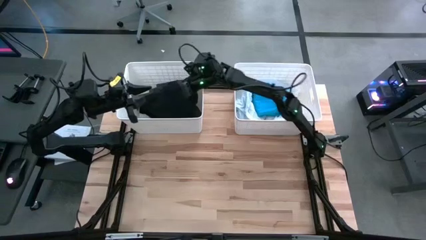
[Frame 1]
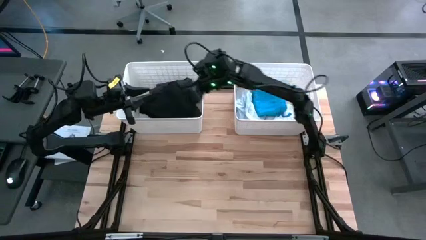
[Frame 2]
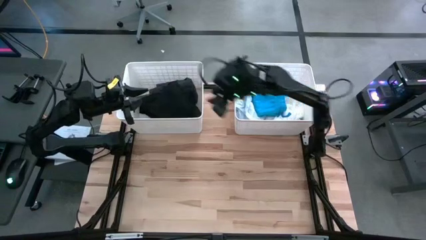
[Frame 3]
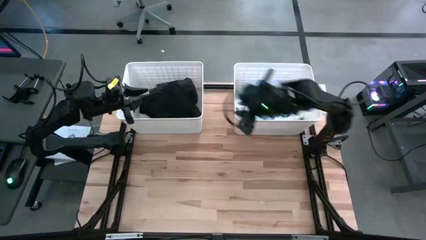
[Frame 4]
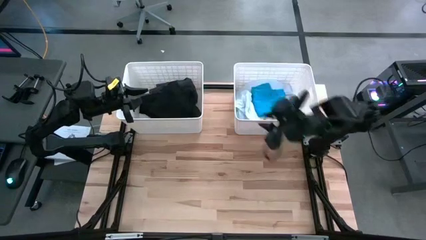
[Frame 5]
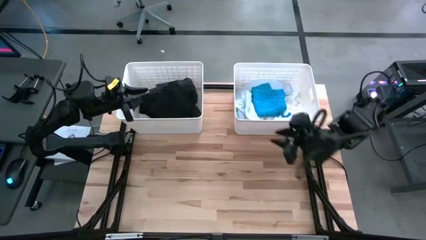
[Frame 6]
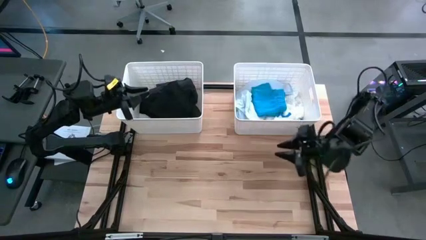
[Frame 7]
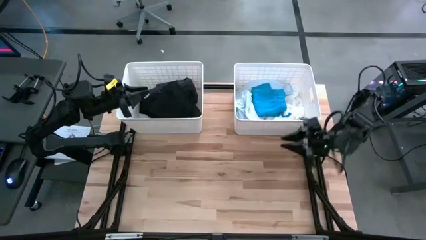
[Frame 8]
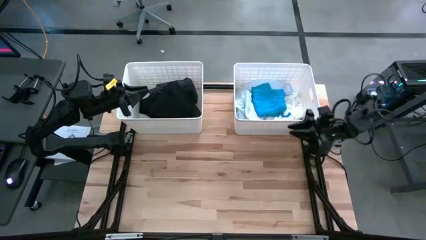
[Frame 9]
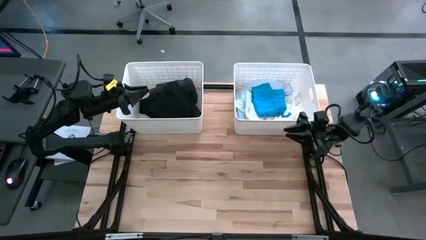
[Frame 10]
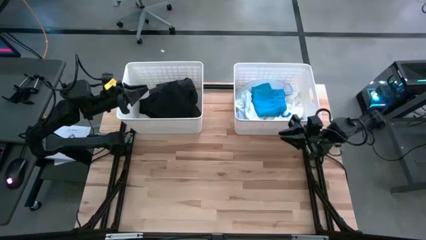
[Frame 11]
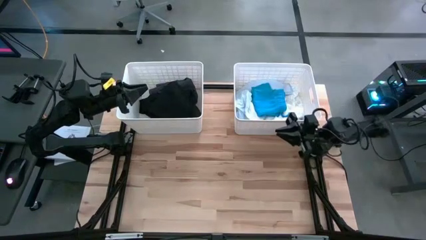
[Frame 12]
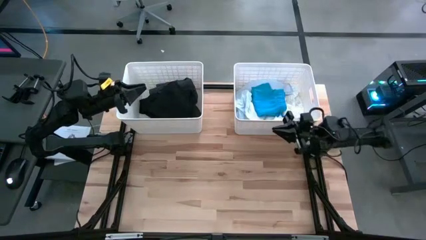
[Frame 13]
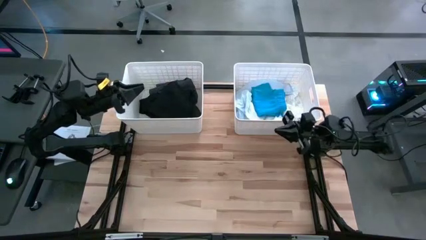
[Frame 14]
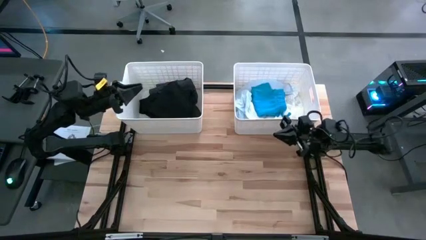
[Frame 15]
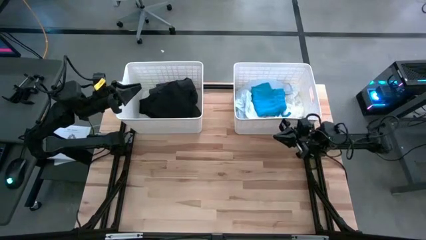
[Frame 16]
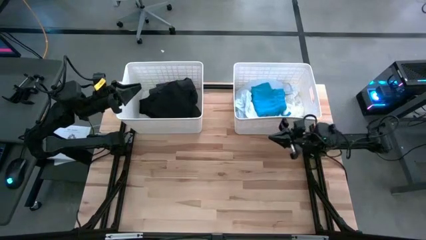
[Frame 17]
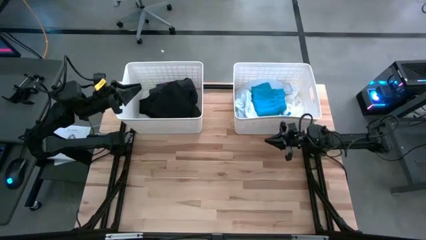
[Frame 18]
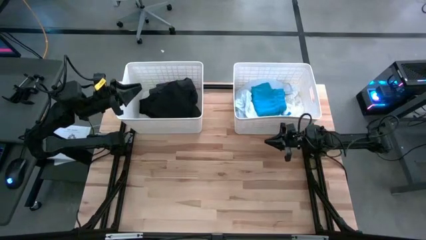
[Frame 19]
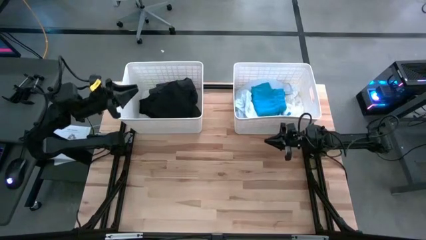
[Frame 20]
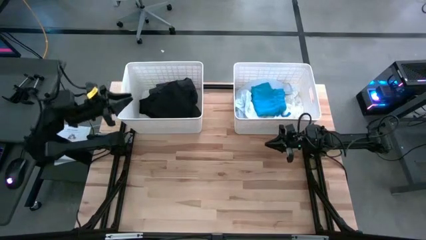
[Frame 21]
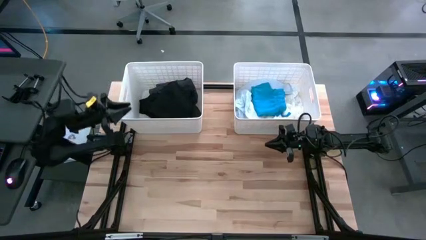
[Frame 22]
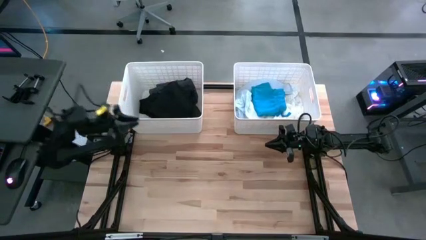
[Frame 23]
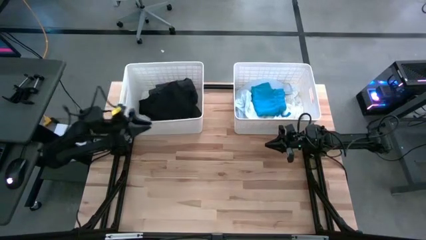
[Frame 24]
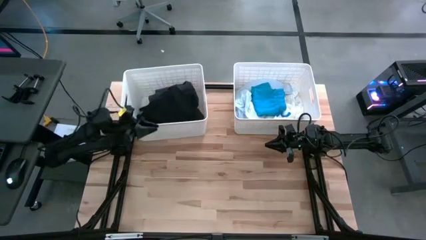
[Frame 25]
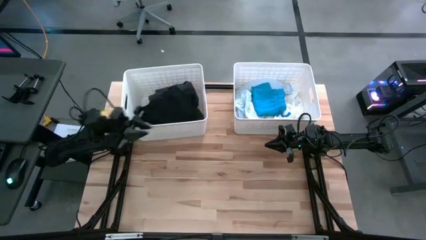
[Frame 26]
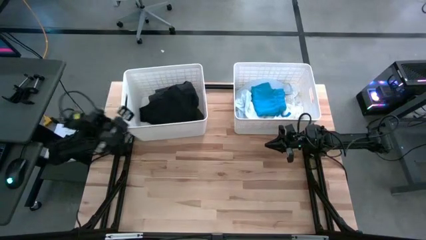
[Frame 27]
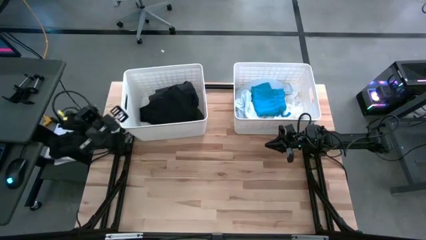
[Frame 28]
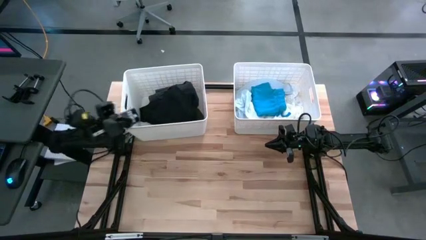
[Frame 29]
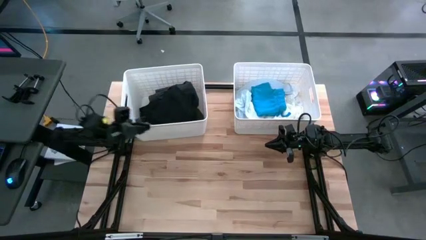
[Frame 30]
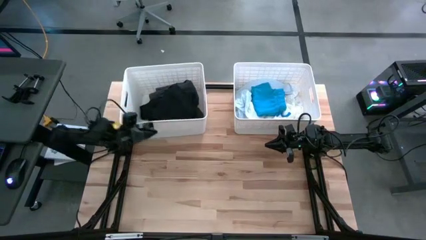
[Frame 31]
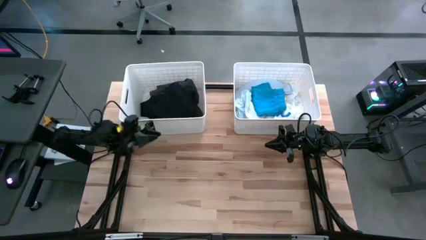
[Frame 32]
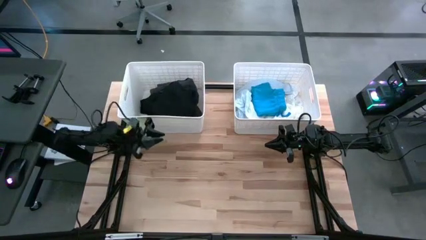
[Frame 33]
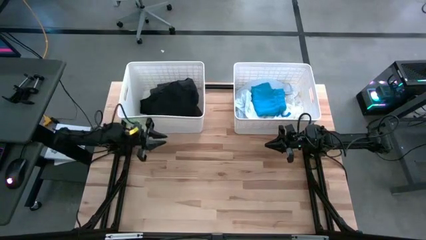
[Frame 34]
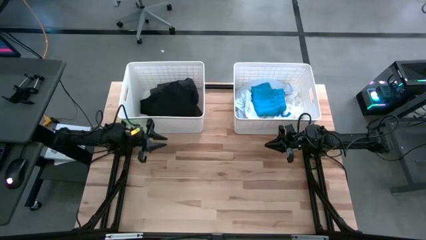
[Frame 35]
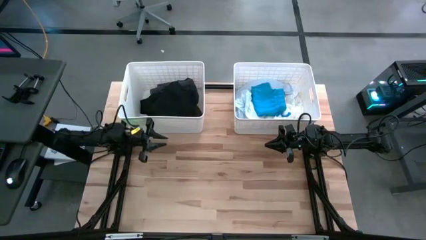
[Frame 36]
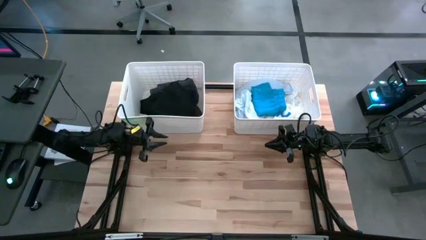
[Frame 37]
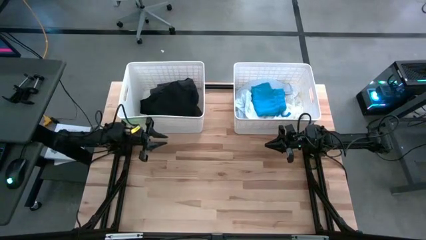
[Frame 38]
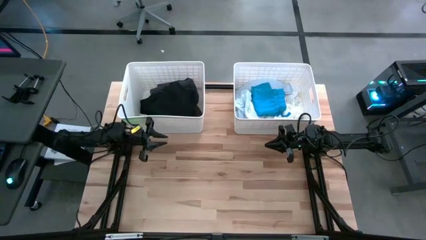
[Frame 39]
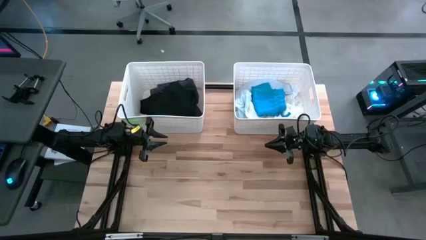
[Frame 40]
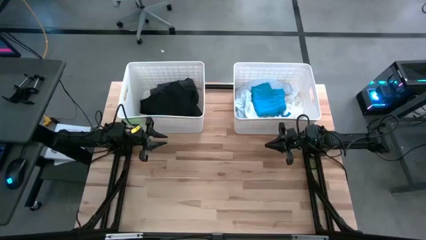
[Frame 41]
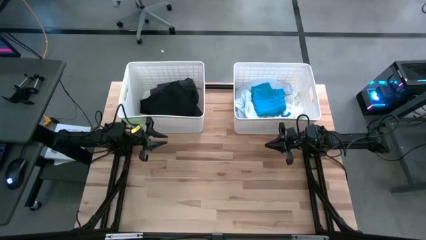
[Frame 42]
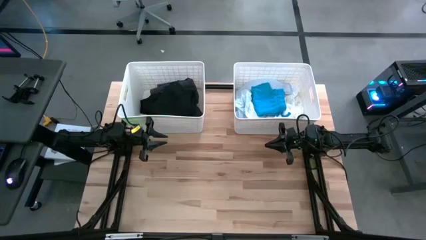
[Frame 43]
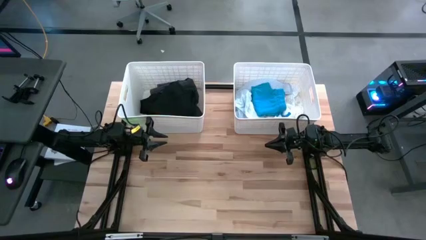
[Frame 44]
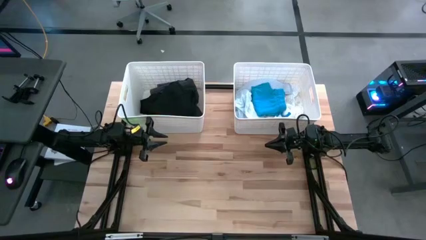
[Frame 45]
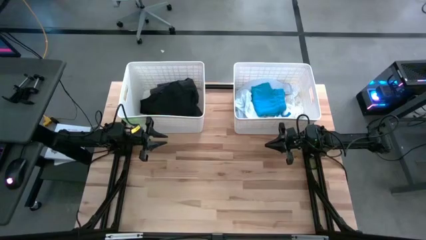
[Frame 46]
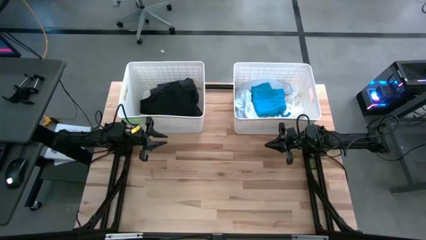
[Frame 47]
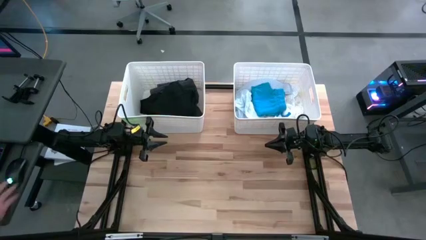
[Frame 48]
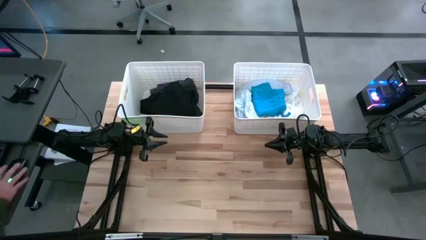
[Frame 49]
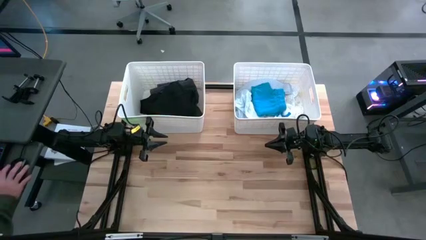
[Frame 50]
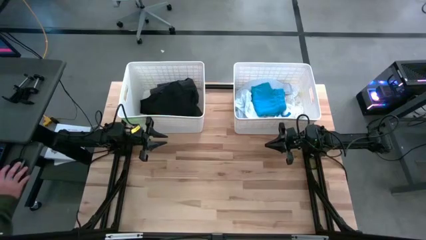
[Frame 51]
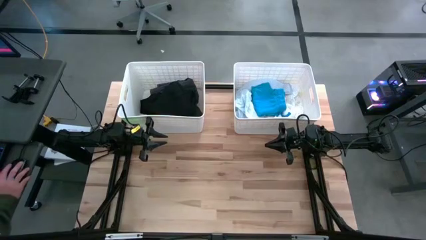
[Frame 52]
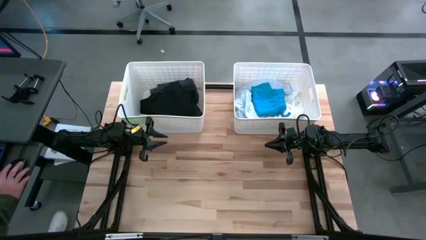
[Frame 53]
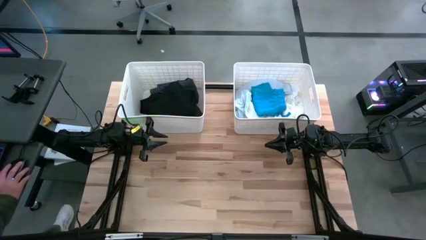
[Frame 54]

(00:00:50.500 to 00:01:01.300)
Task: Sort clothes
Return to Home Position

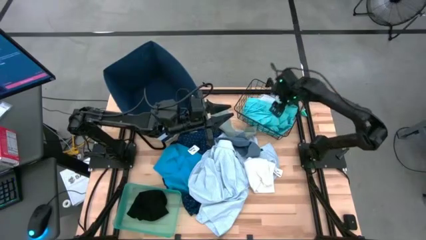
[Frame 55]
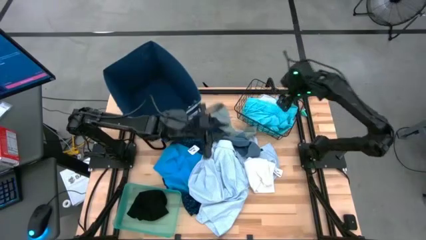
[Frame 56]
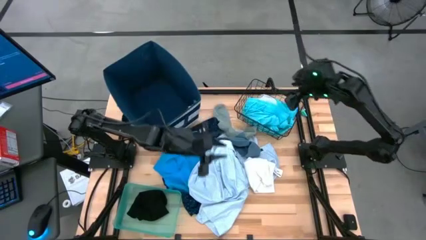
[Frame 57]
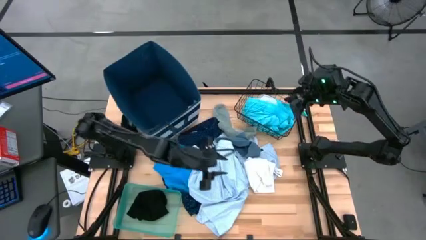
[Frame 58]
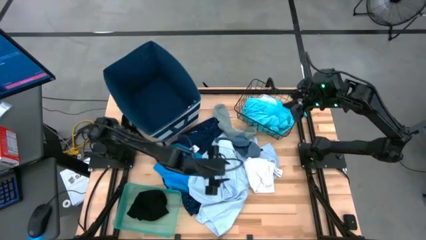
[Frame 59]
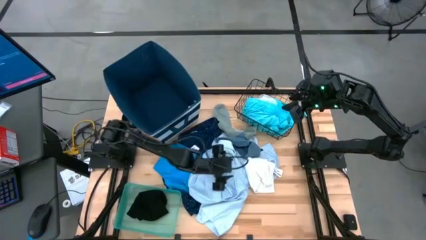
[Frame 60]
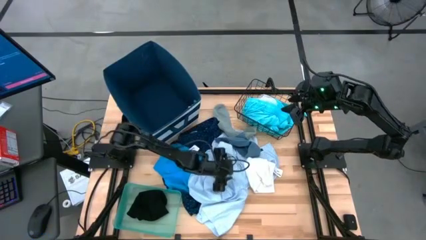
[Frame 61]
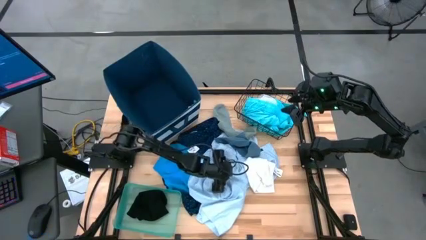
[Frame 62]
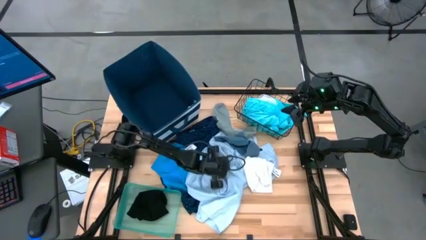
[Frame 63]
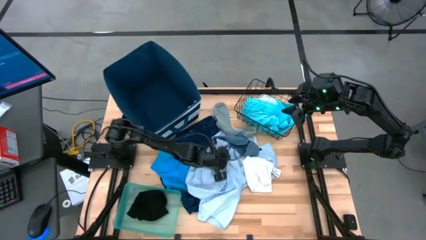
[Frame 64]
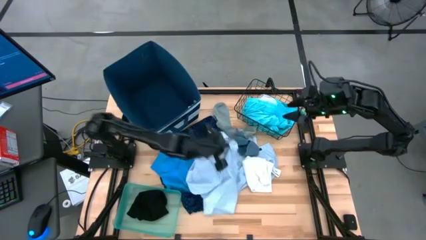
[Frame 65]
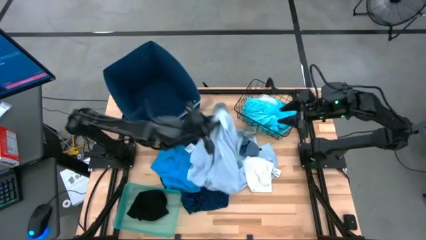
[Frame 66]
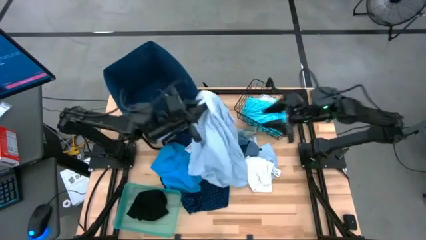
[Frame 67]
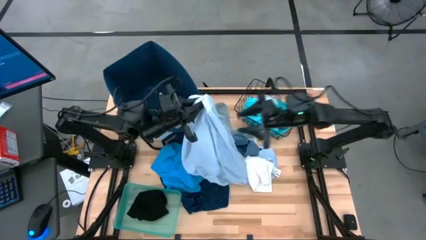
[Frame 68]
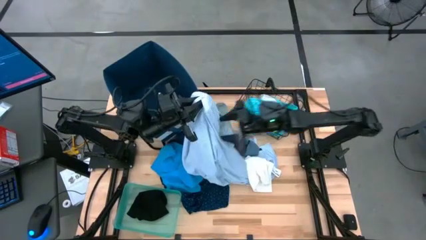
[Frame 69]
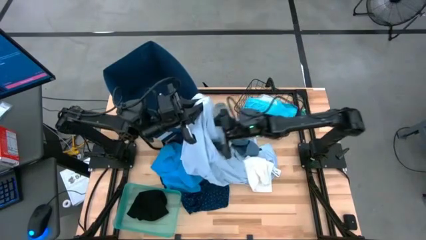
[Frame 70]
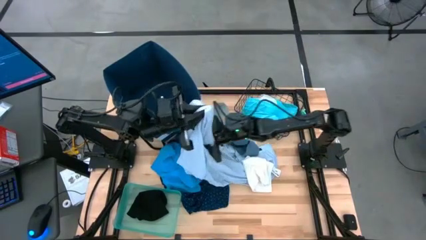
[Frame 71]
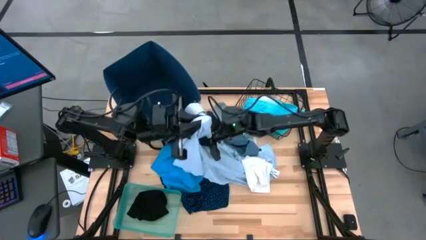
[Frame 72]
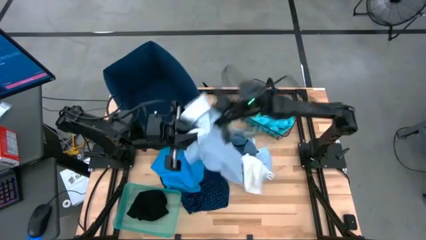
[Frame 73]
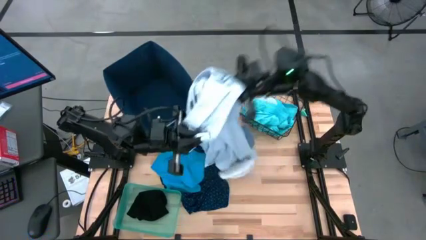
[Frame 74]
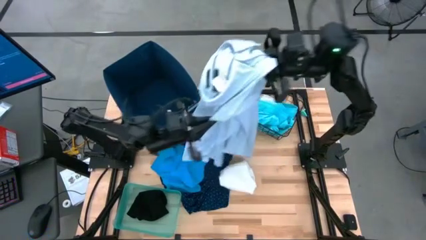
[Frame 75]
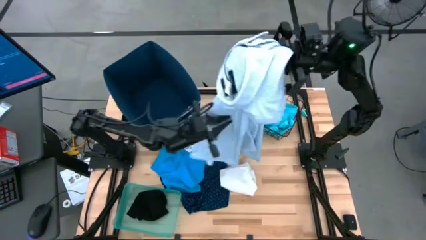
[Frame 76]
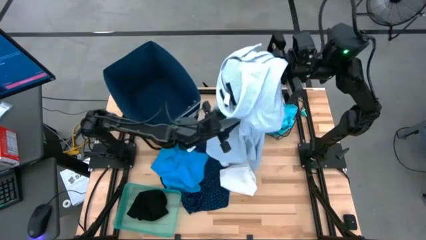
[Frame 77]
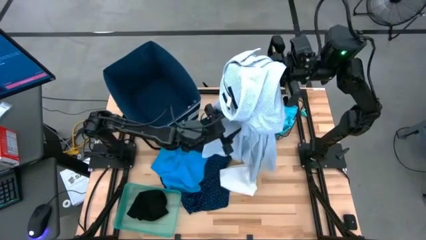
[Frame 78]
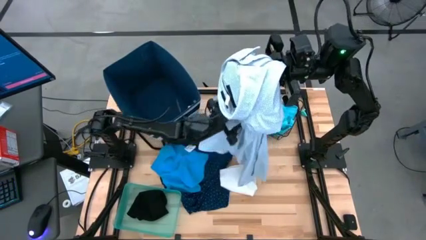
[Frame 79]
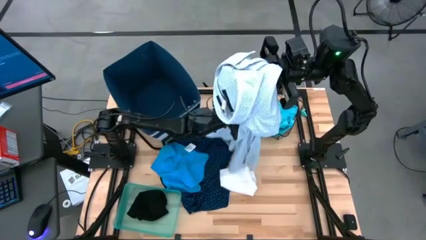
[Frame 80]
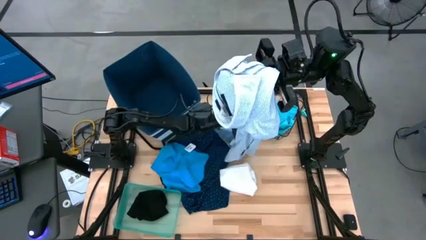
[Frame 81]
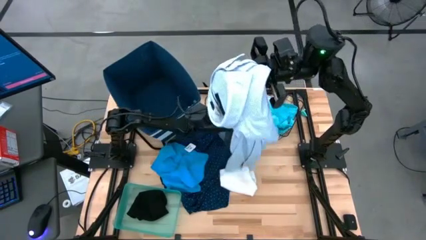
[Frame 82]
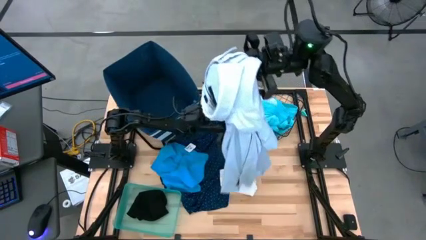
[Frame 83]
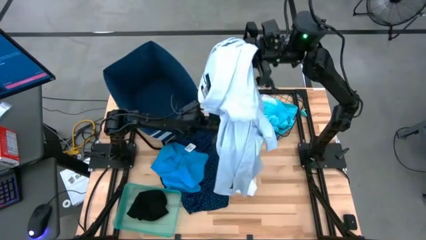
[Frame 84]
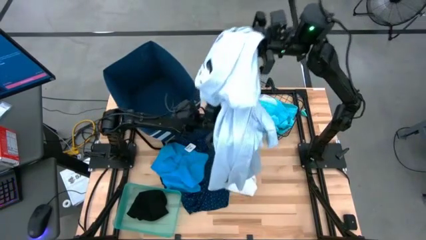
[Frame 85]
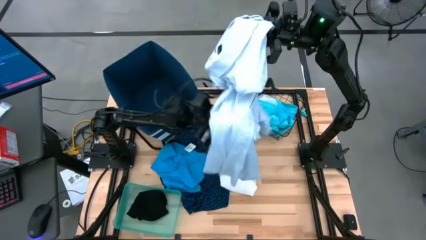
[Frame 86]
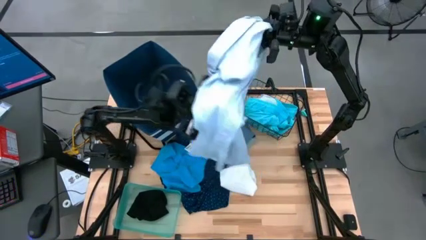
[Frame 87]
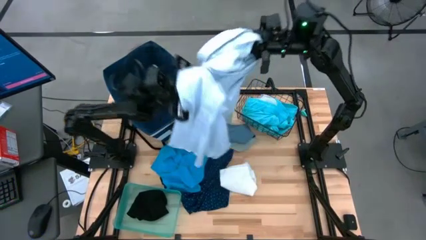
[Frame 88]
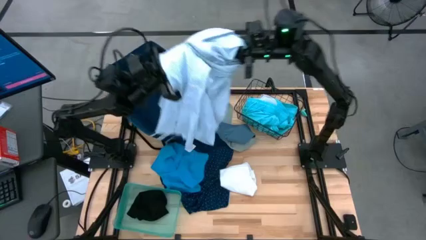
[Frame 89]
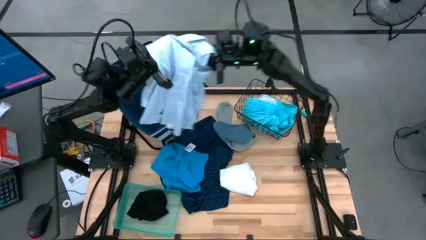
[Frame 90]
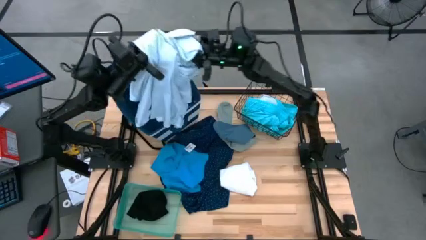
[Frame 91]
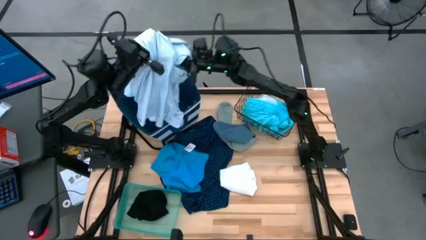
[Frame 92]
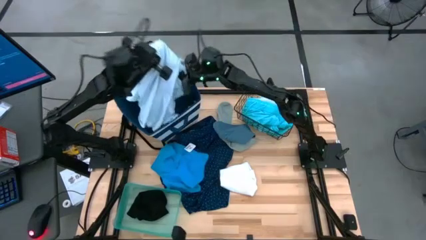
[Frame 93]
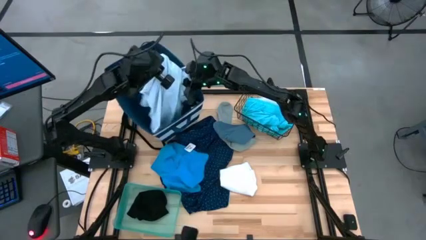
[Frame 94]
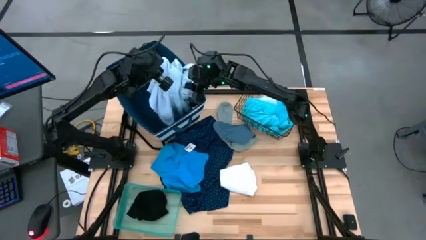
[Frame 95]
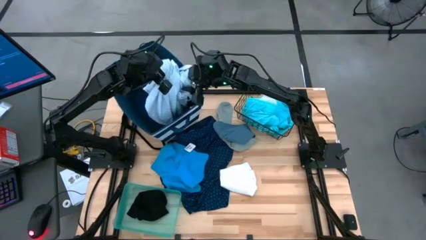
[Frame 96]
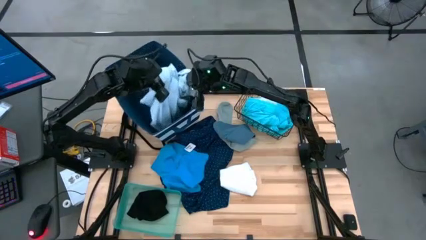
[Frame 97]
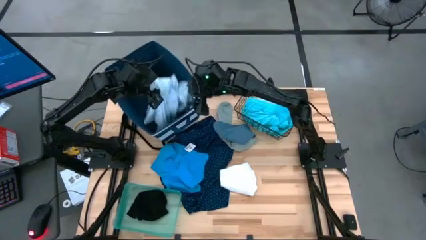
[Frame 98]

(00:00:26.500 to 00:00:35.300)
Task: Pick & Place Cloths
Put the blue patterned cloth into the blue laundry organizer
